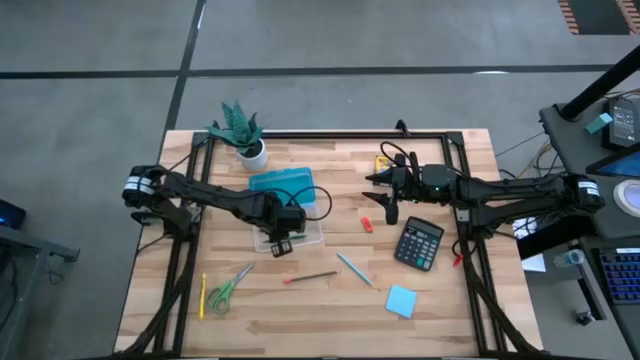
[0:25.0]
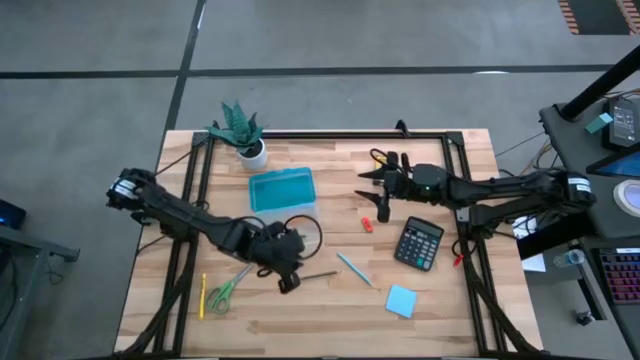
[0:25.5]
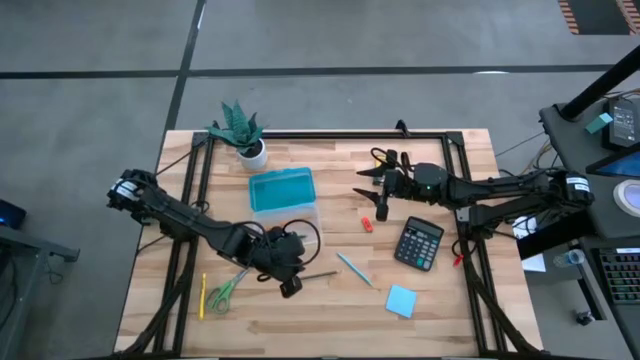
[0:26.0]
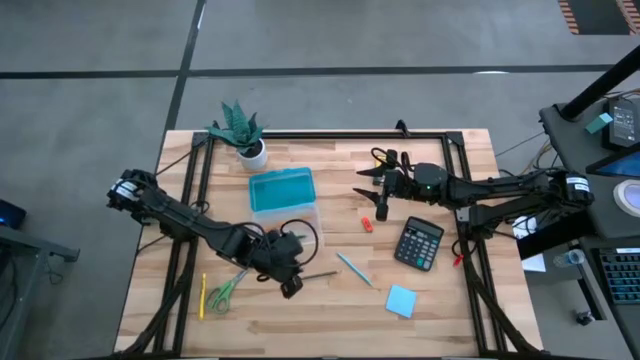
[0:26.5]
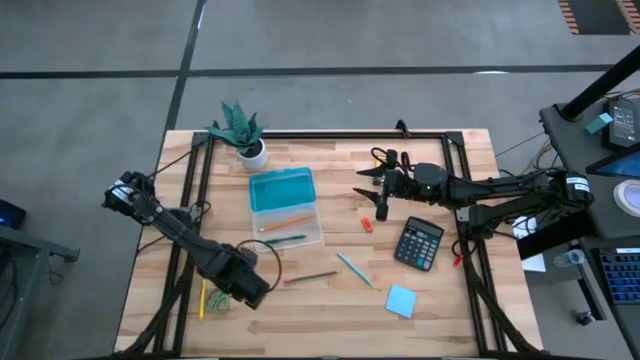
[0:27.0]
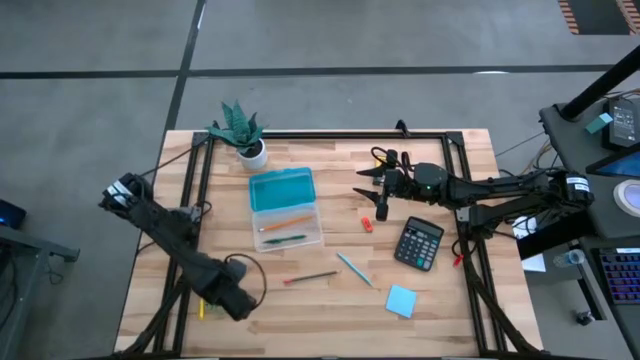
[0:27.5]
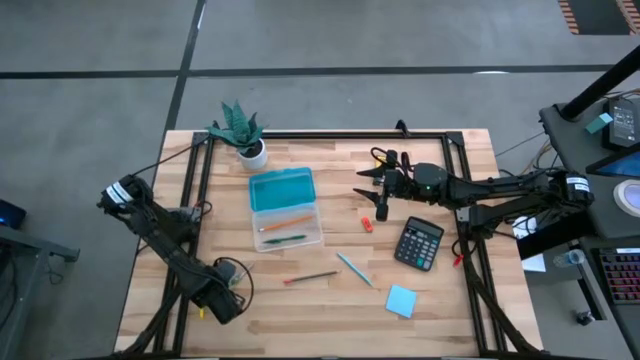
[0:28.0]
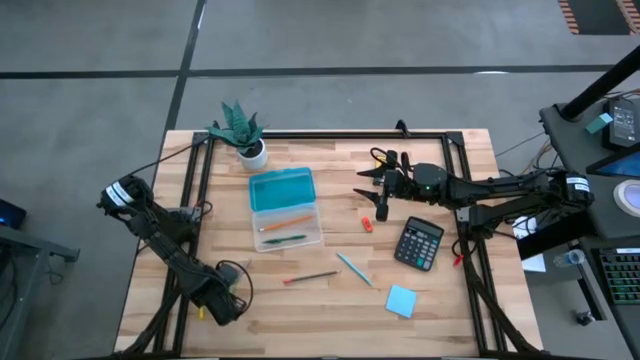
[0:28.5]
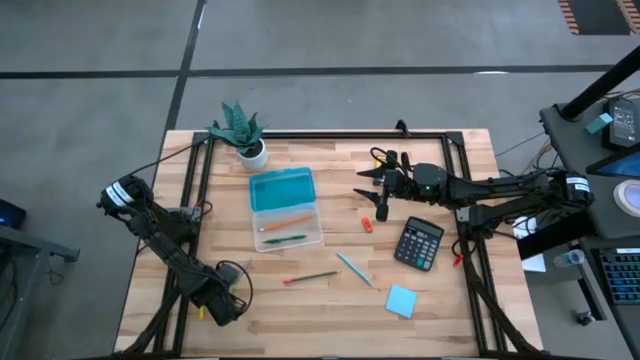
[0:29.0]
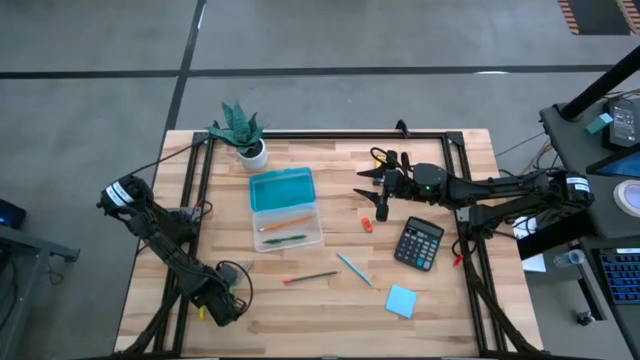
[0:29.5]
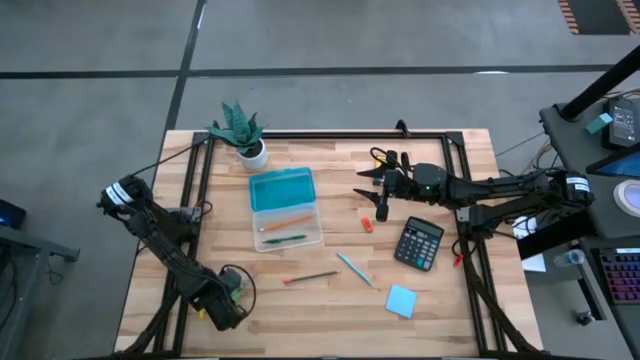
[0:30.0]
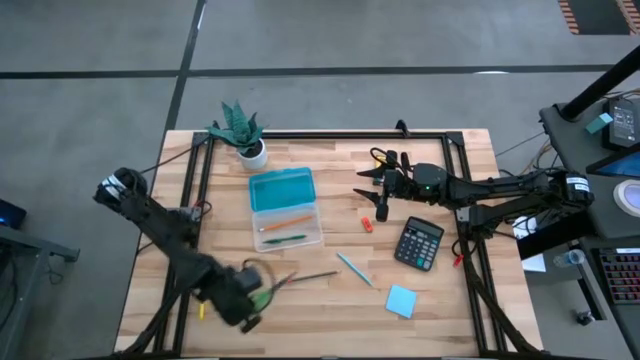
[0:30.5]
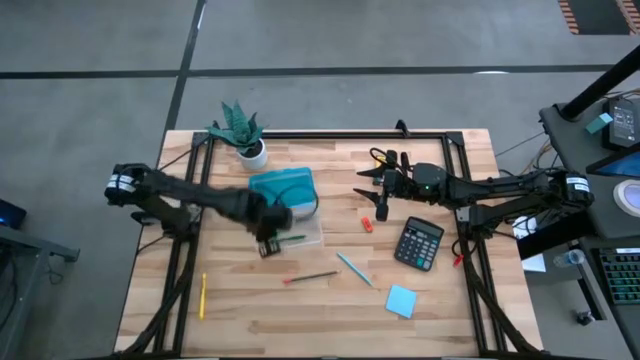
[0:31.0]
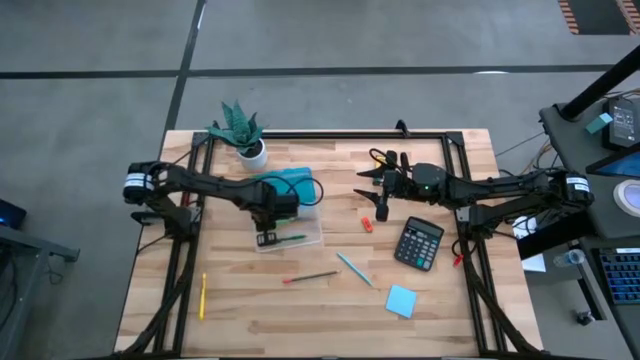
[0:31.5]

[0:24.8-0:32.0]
Task: Pack school essentials
Put the green scissors into the blue supply box

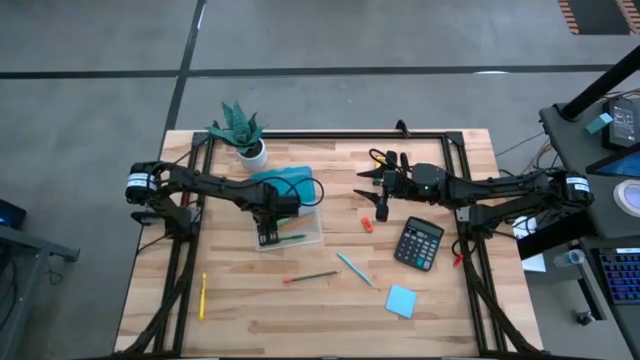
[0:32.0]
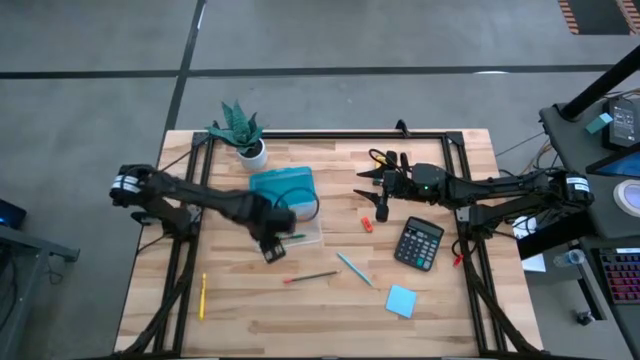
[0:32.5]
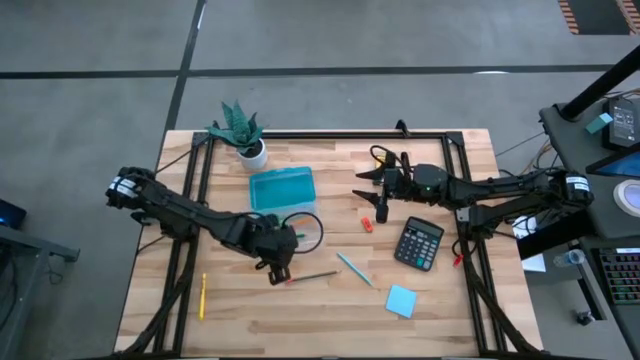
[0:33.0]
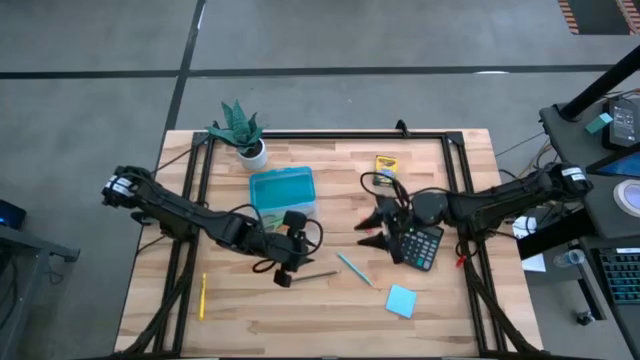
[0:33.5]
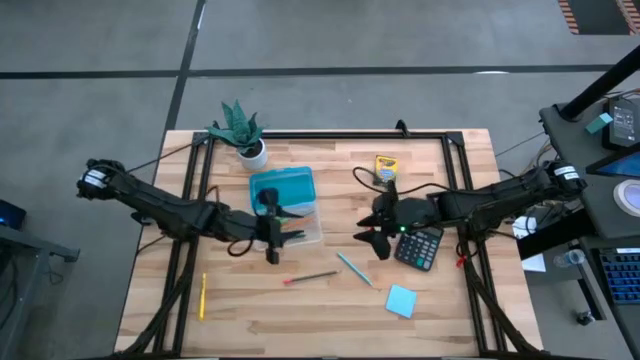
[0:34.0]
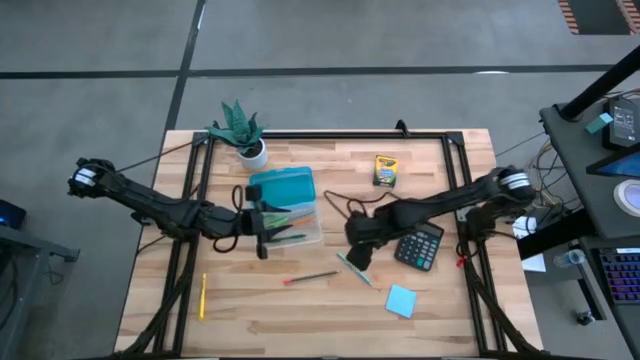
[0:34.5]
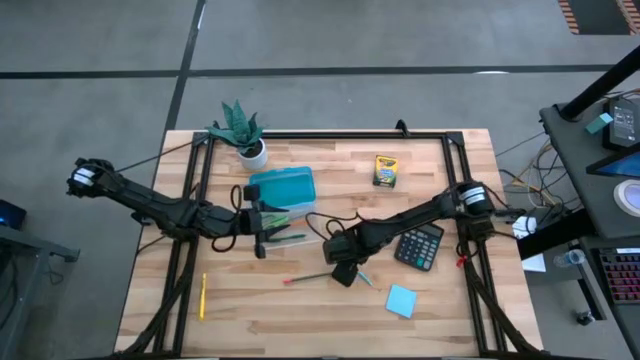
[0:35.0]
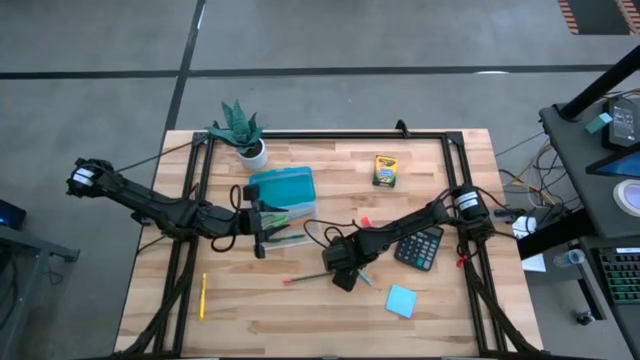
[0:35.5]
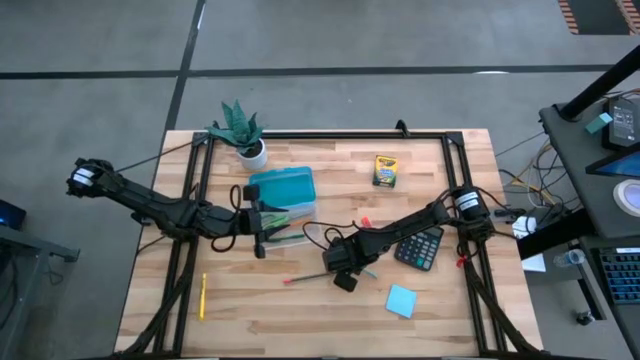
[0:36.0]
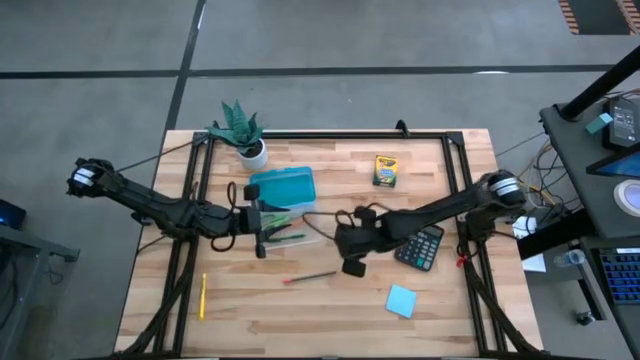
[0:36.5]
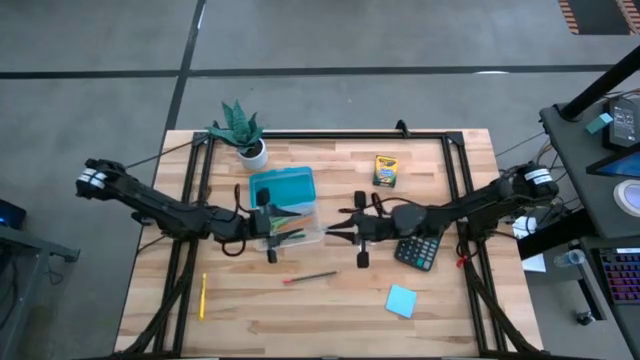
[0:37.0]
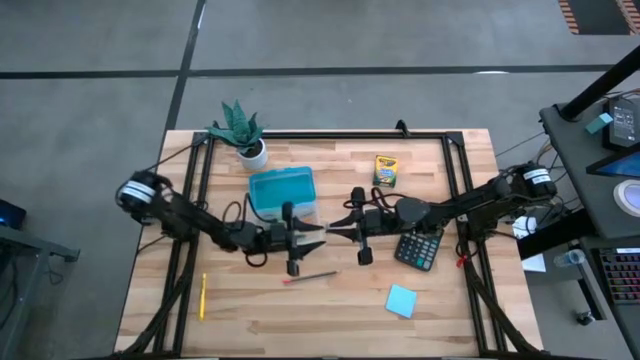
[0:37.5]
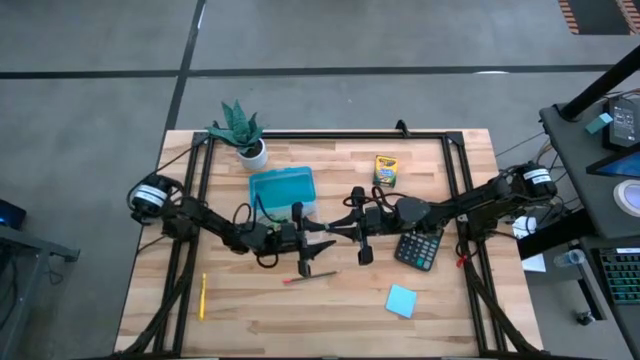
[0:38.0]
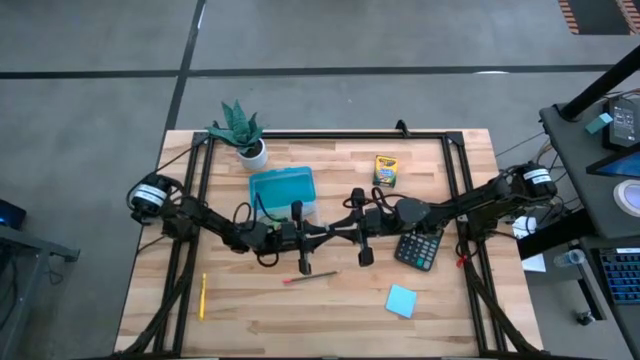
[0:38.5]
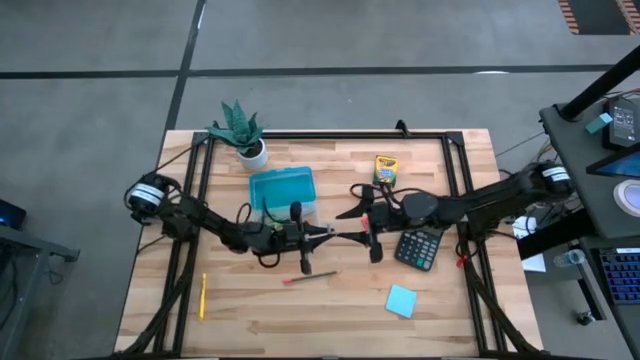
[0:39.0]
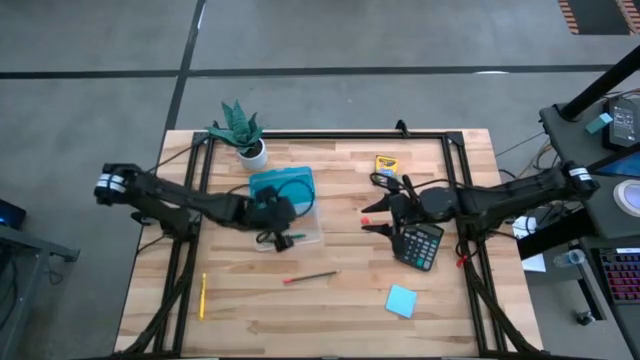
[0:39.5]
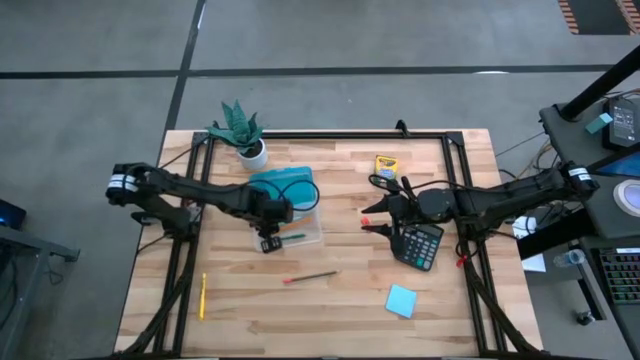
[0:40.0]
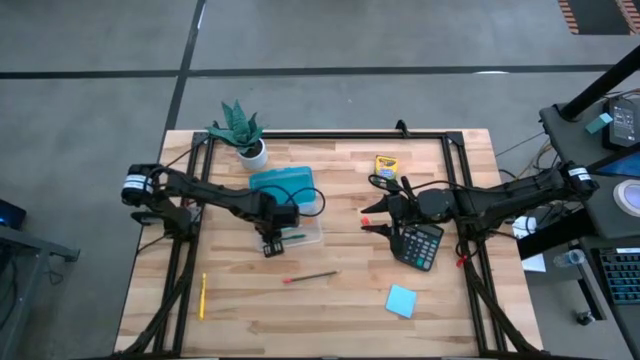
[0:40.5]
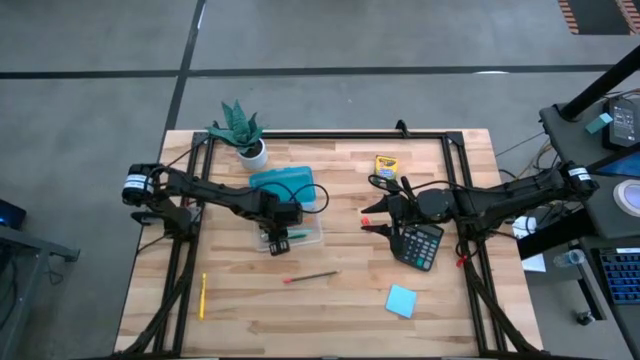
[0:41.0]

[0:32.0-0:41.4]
Put the blue pen into the blue supply box

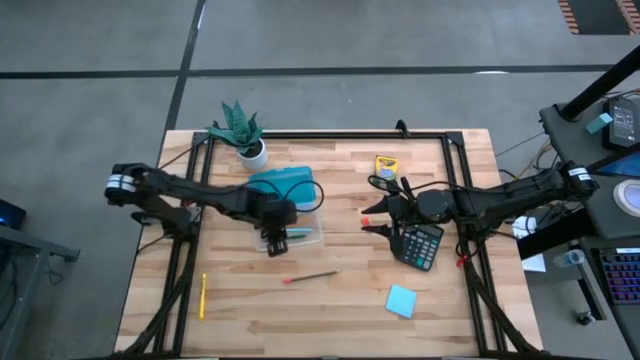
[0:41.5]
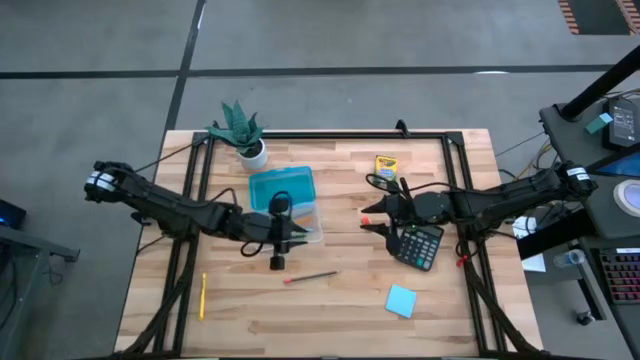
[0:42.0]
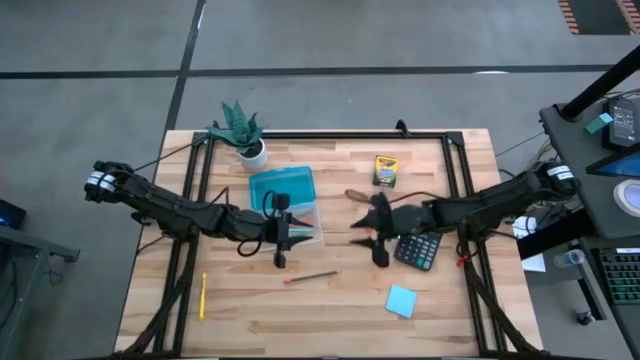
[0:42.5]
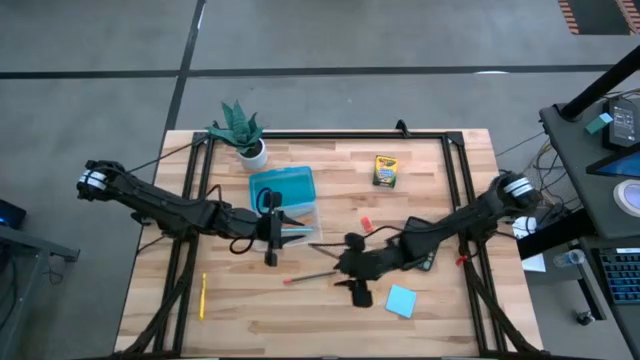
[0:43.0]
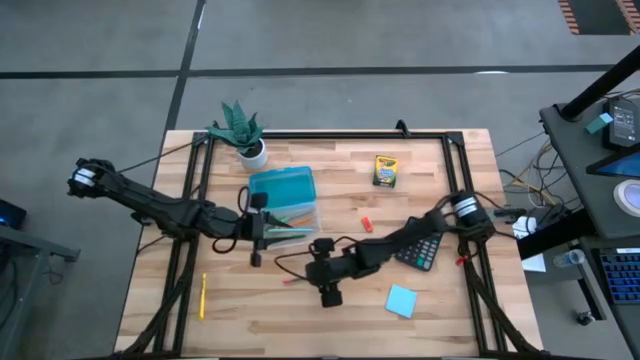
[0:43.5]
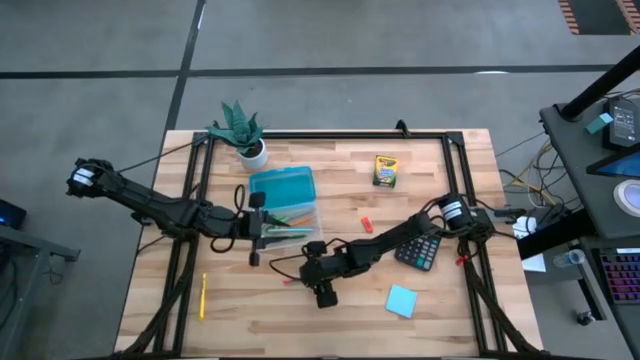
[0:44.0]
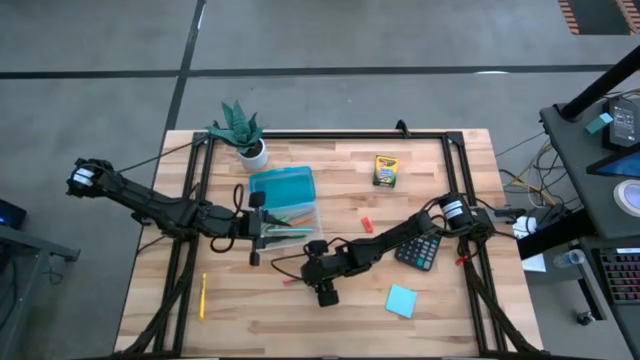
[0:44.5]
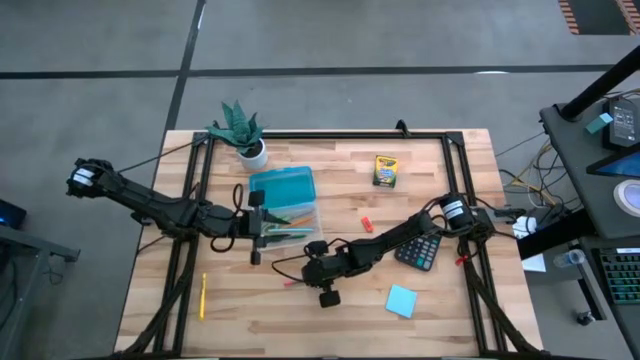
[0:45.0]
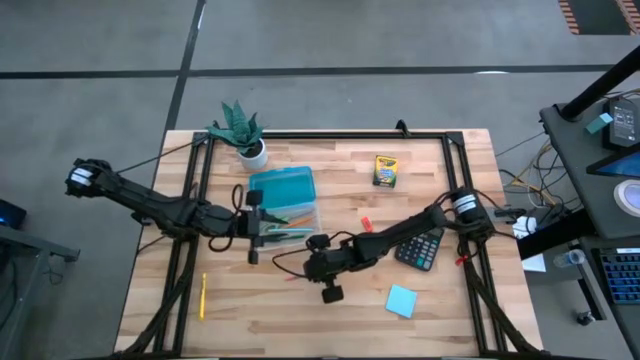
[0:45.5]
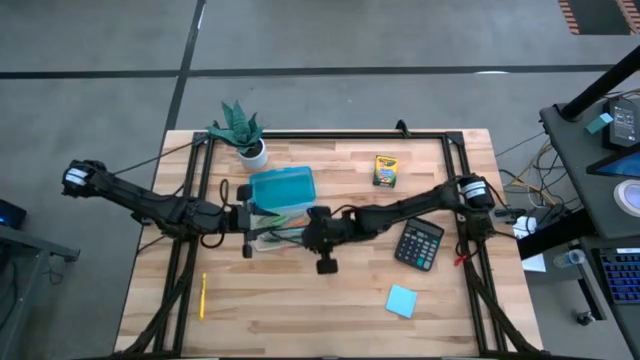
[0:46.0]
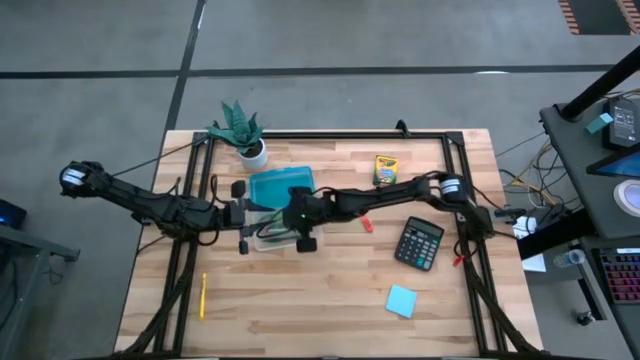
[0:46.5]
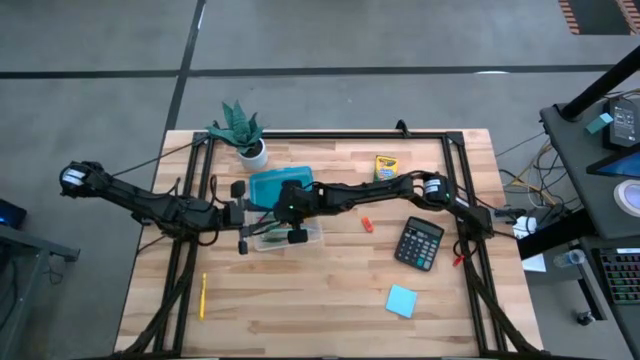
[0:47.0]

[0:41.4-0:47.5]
Put the black pencil into the blue supply box
